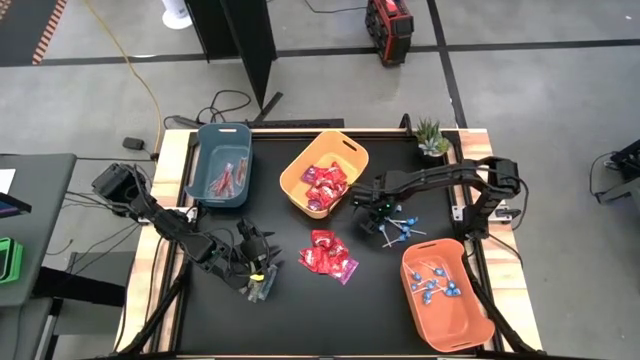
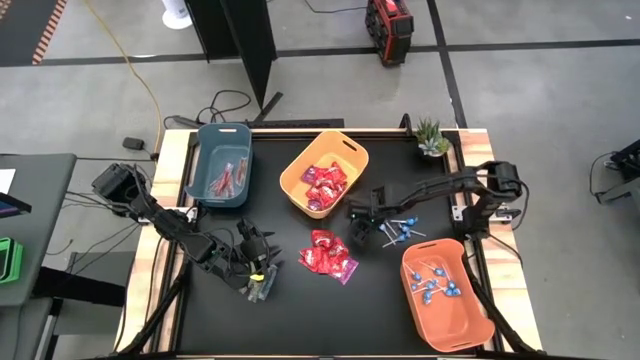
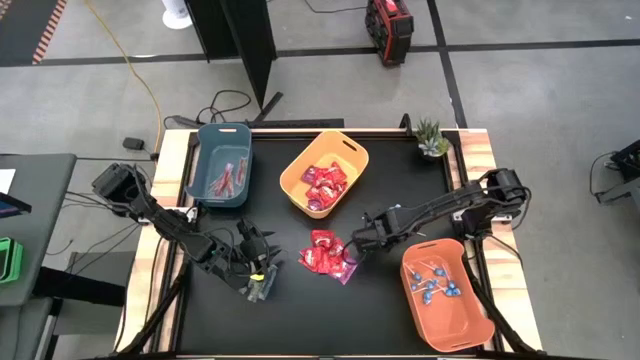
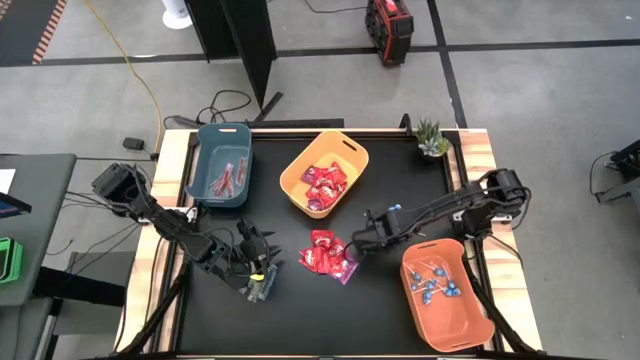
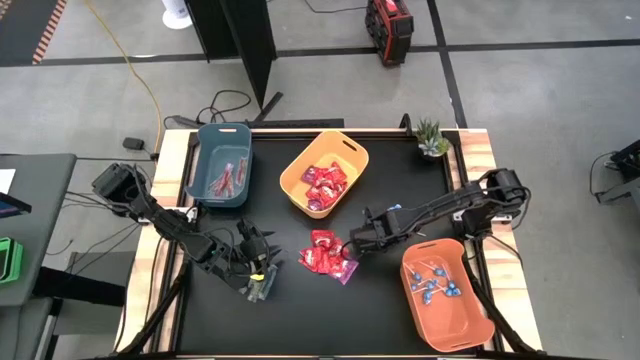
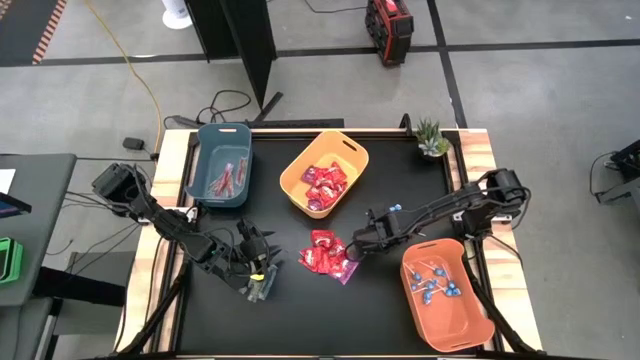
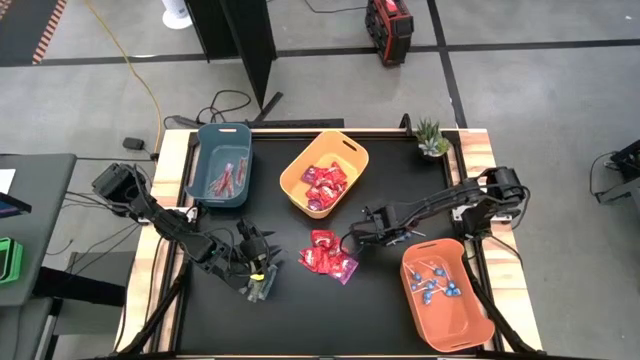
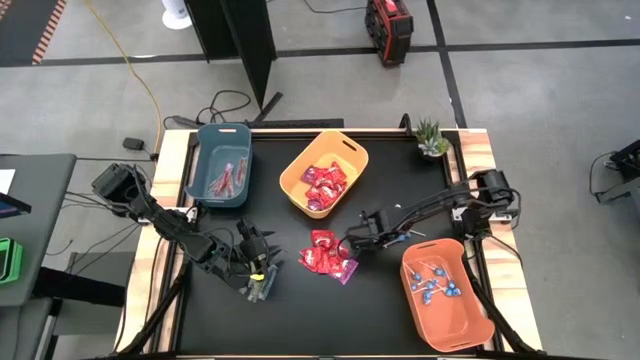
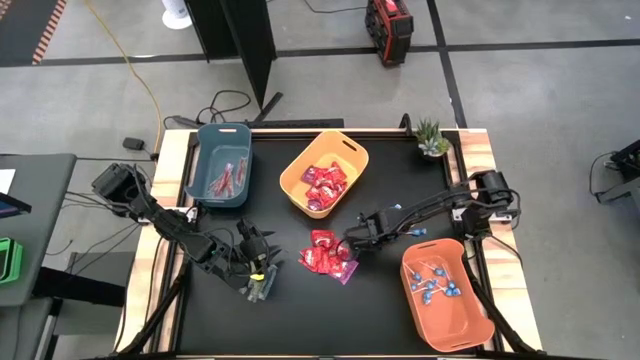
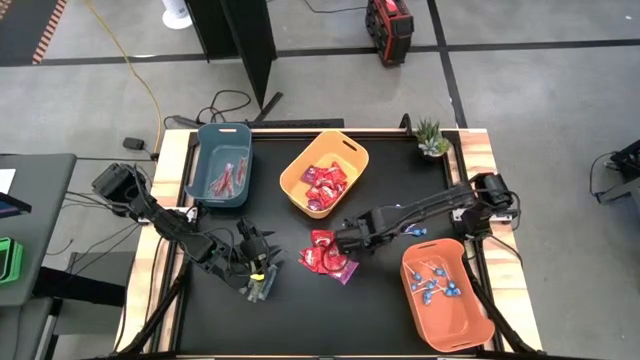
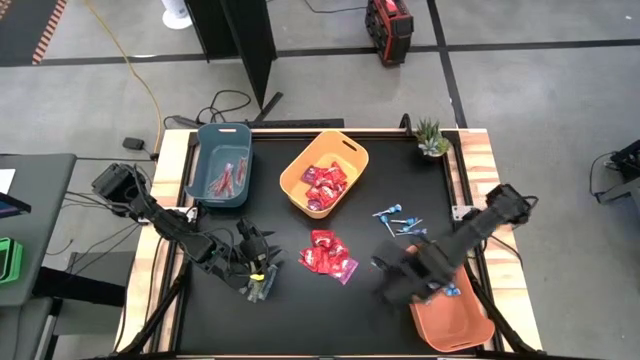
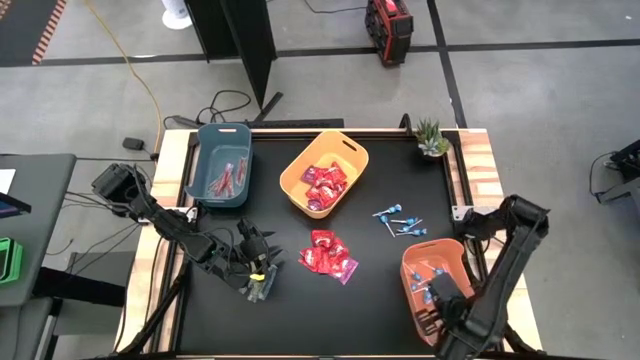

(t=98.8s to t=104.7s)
Task: Sort candy
Put the blue lollipop into the orange bin

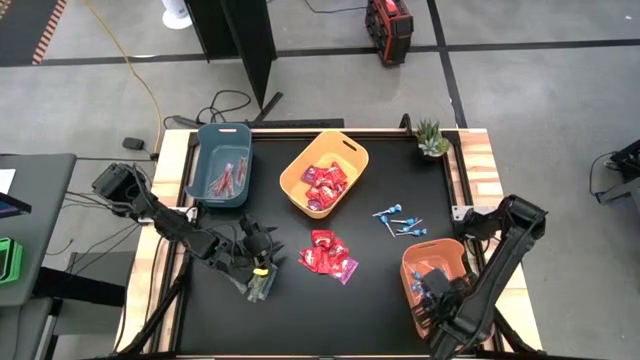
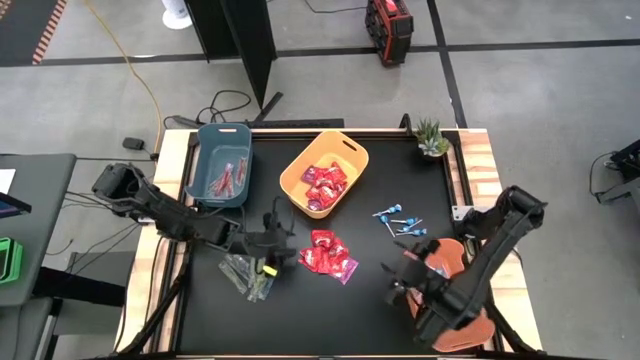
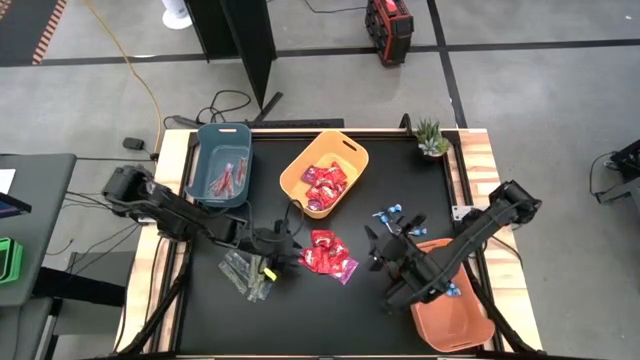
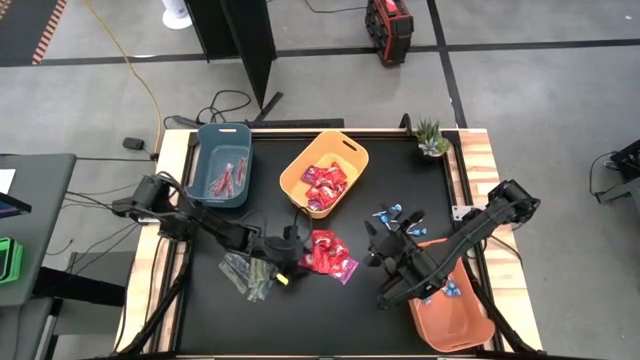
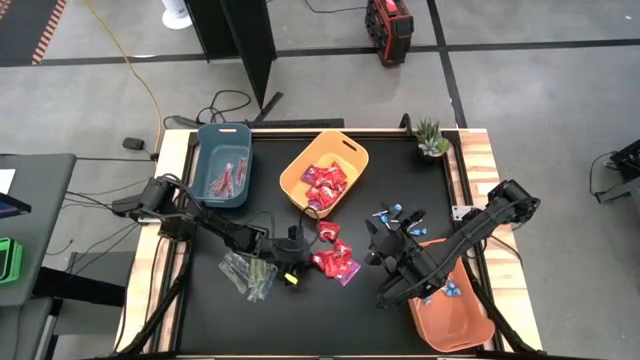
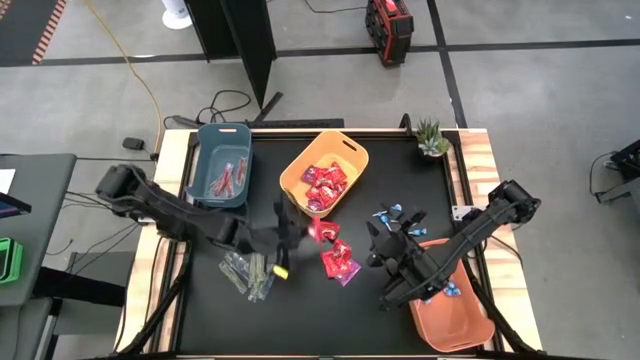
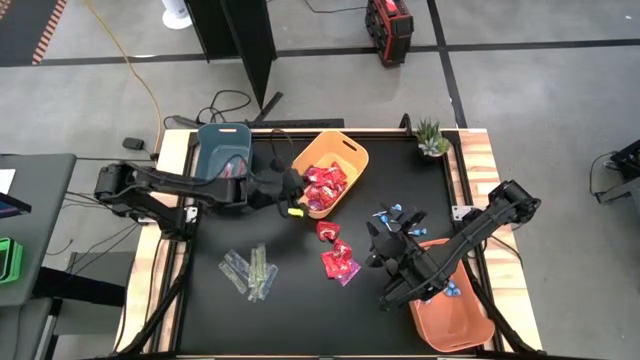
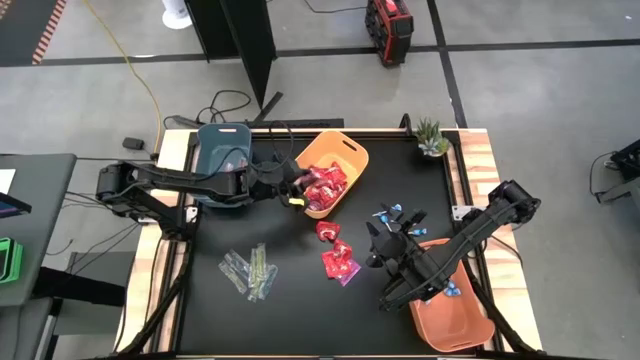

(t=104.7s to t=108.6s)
Put the red candy into the yellow bin

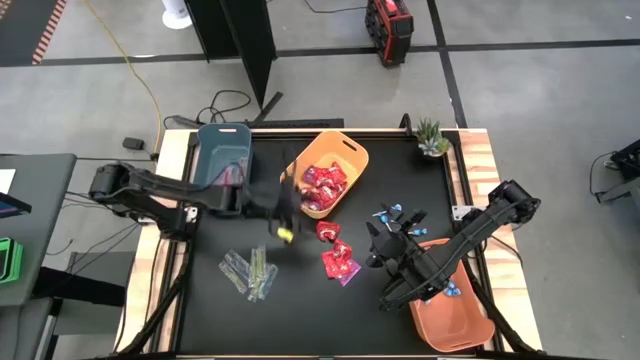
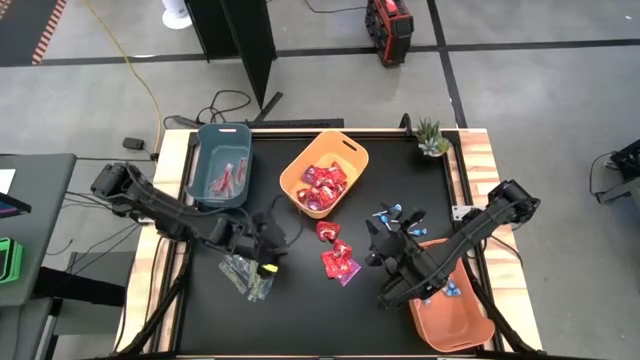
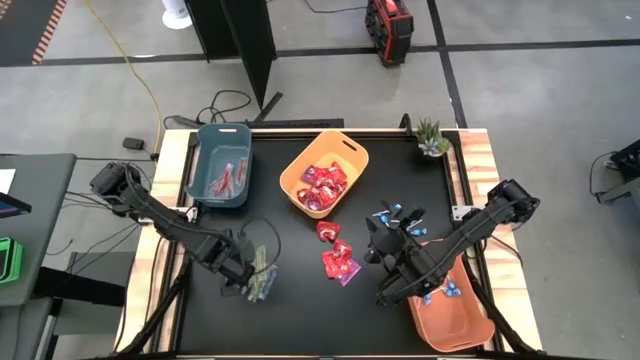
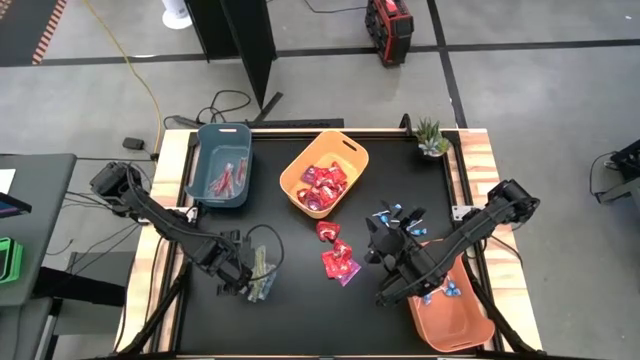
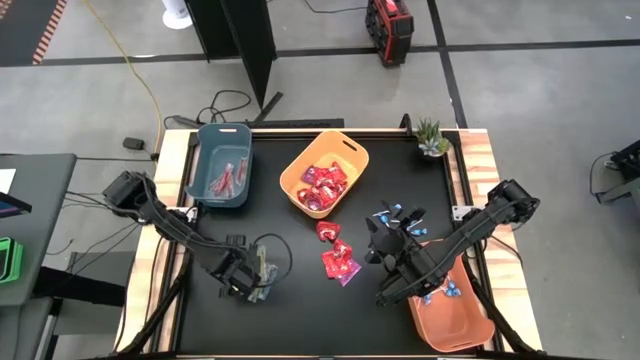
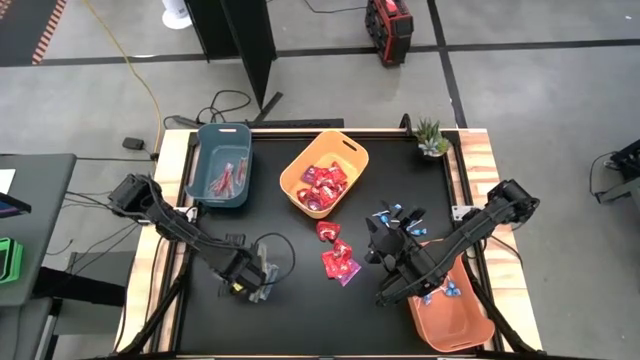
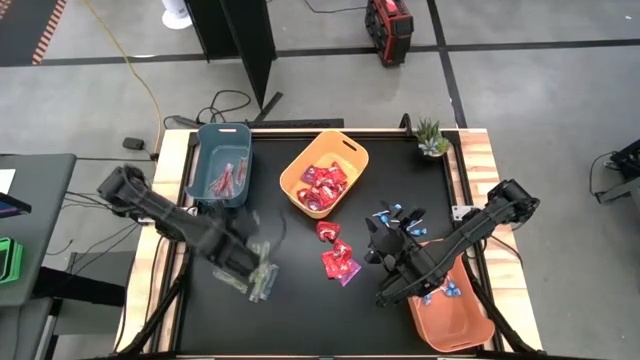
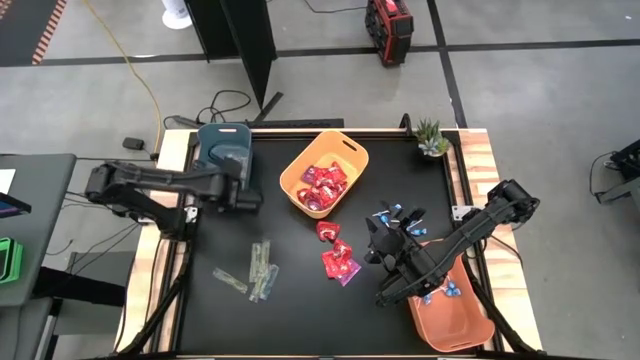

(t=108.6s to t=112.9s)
Put the blue gummy into the blue bin

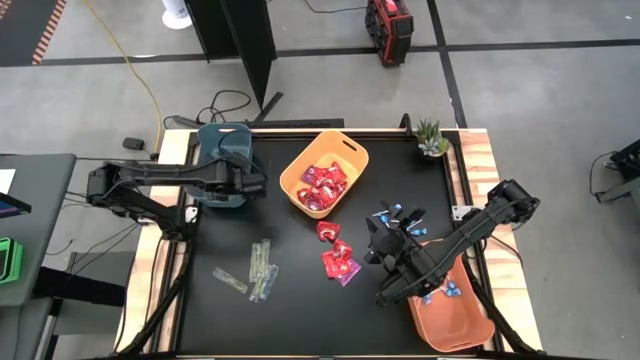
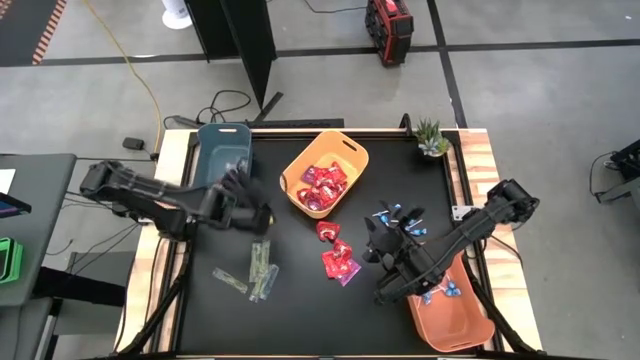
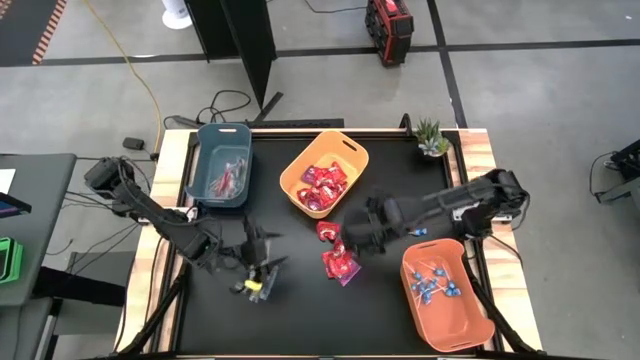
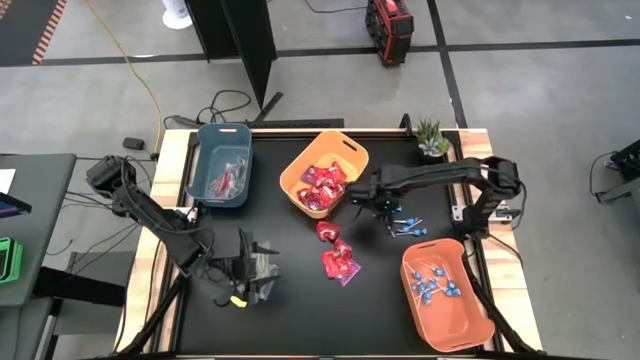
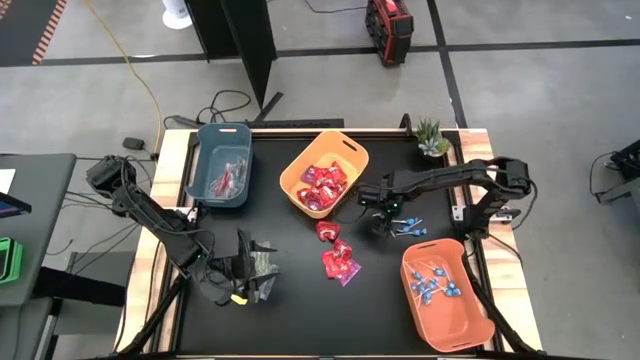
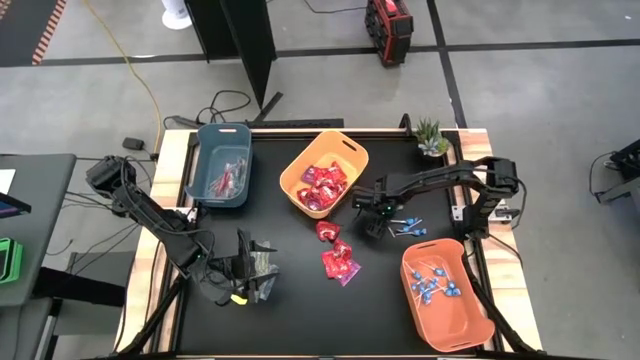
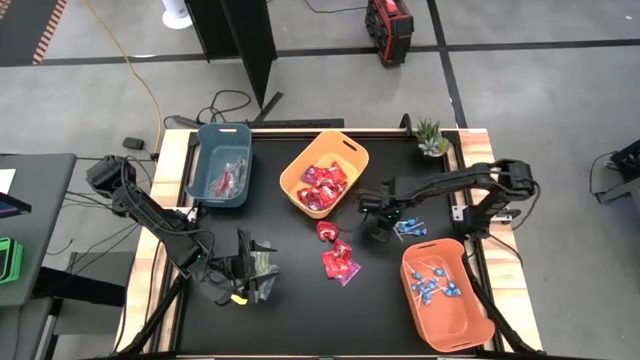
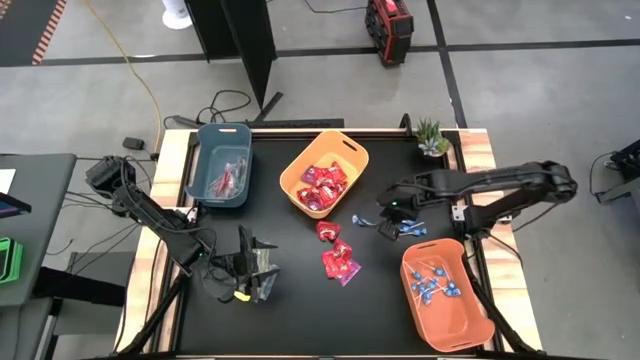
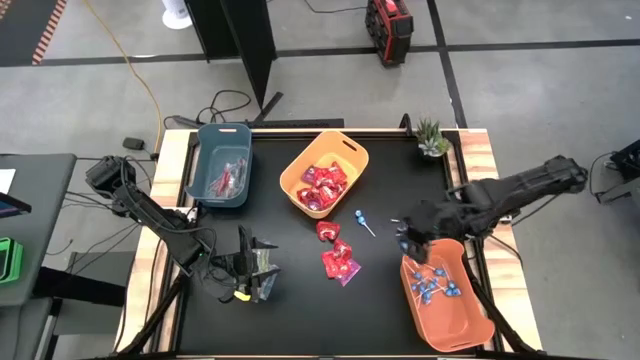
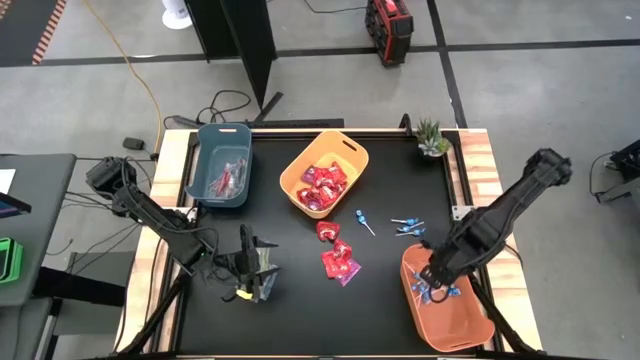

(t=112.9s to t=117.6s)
Put the blue lollipop into the orange bin

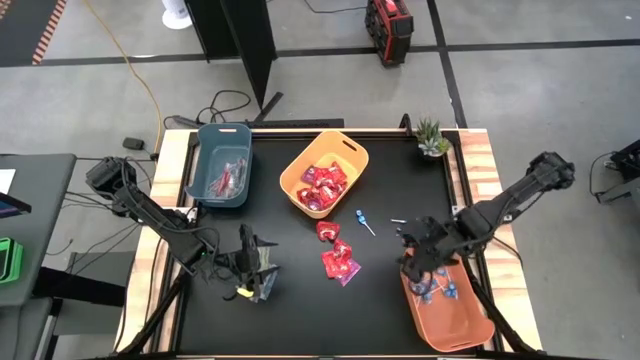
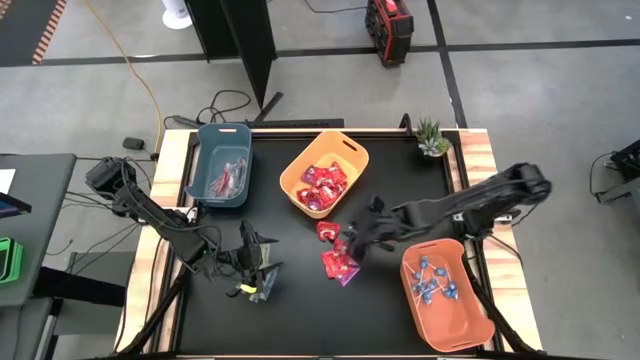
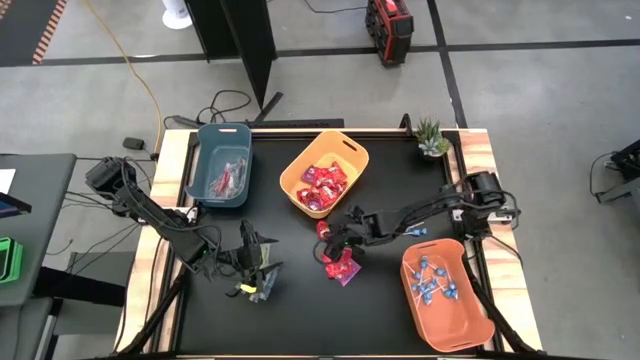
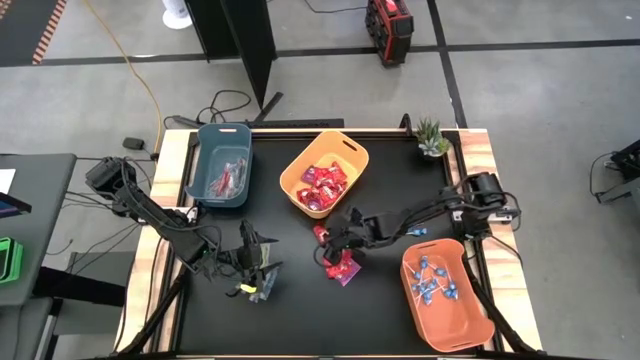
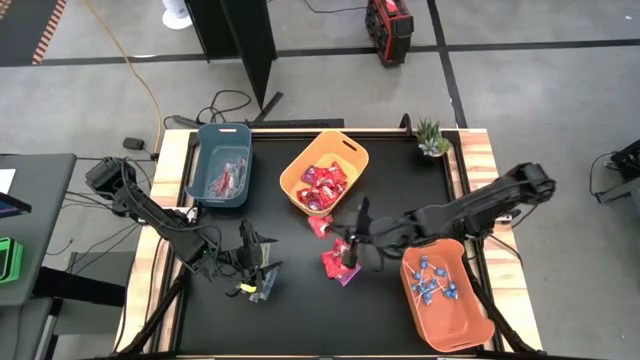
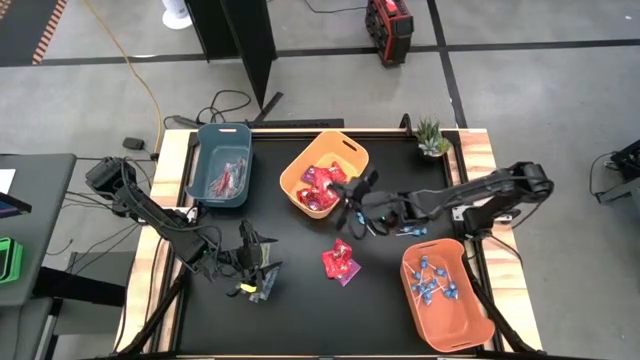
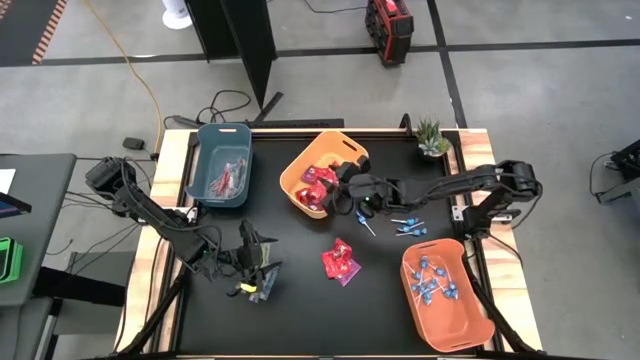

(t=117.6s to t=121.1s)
Put the red candy into the yellow bin
